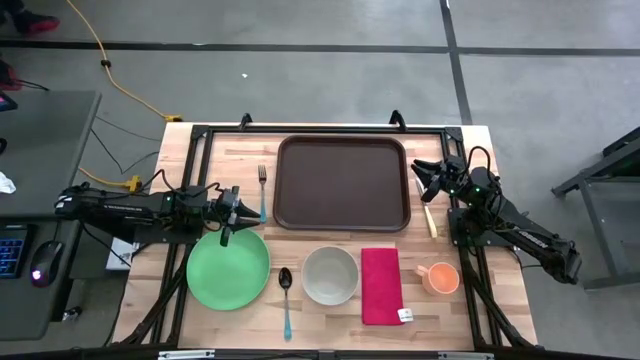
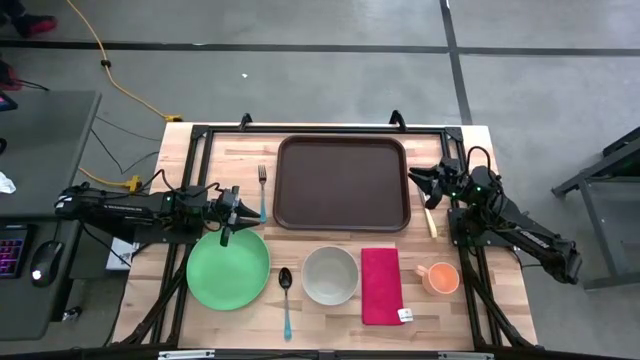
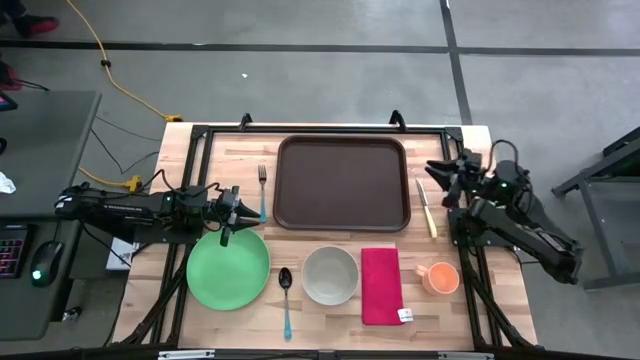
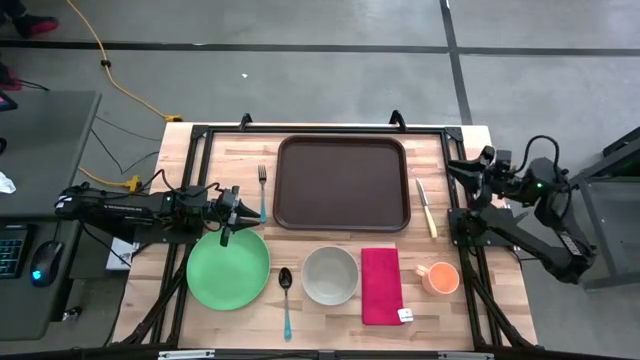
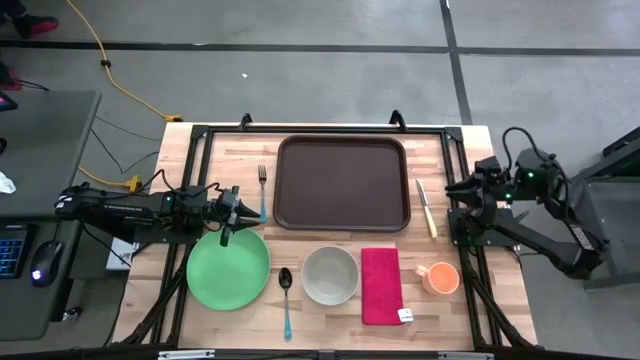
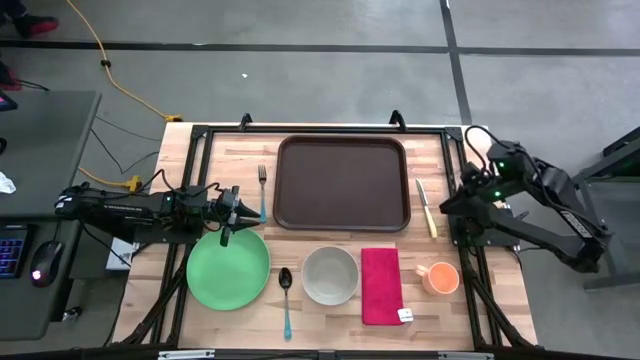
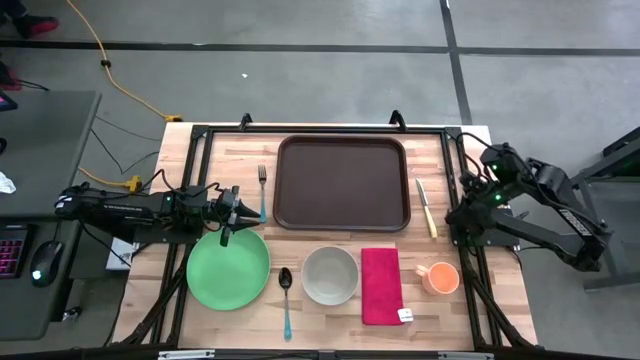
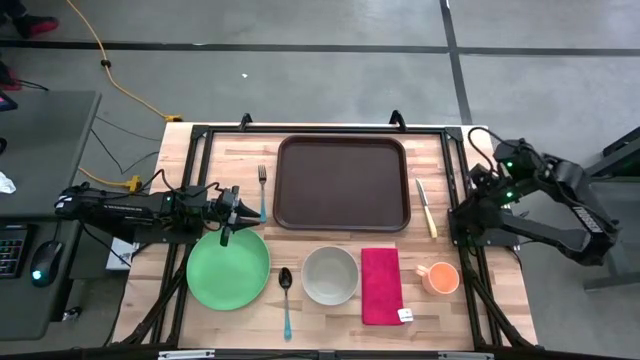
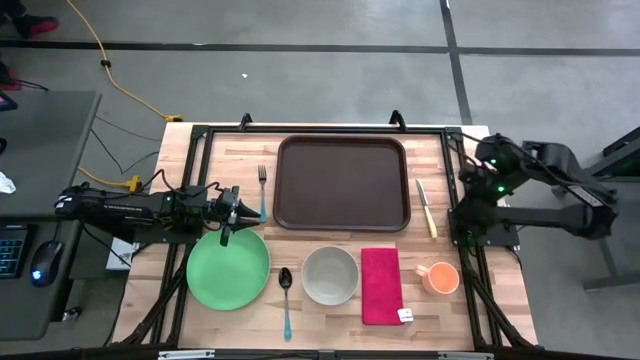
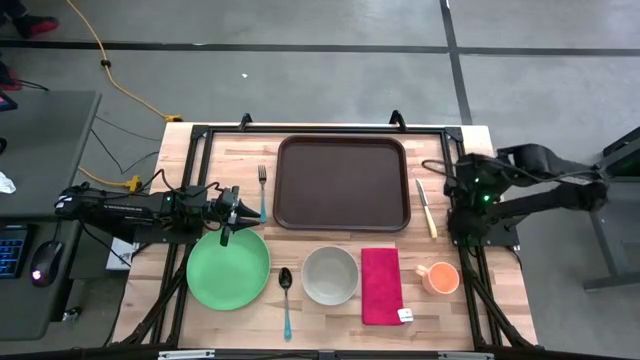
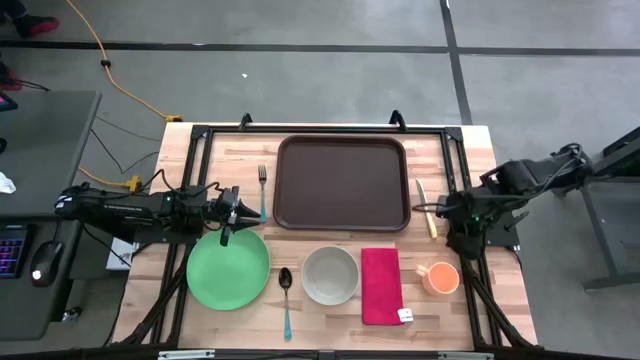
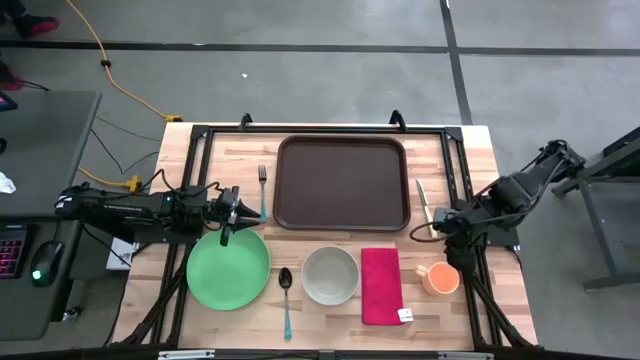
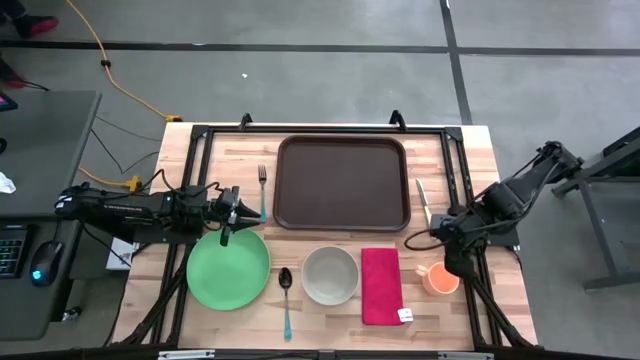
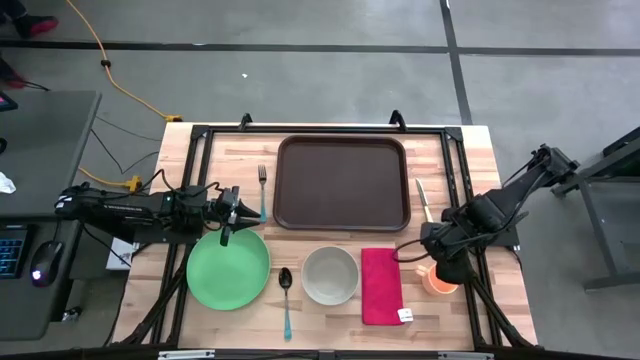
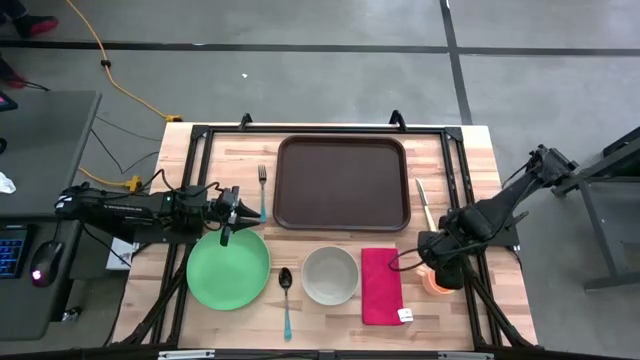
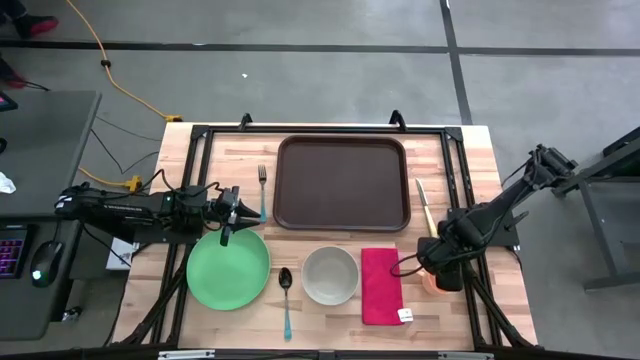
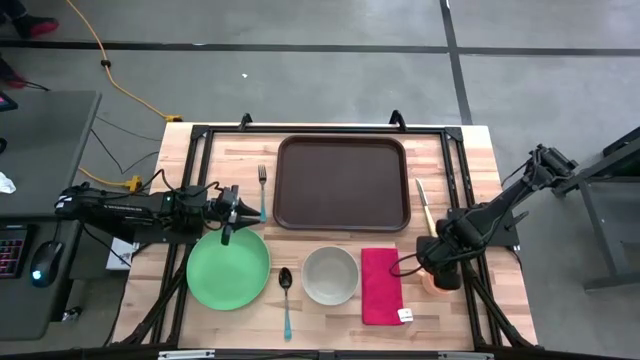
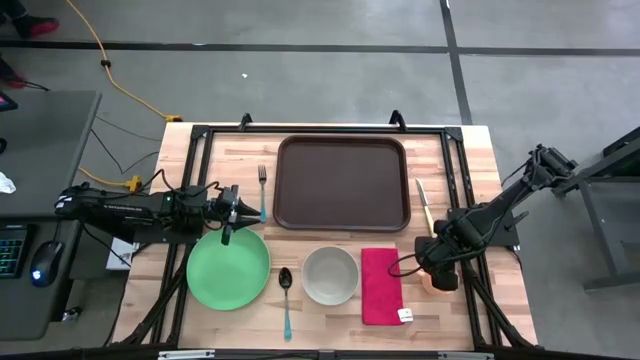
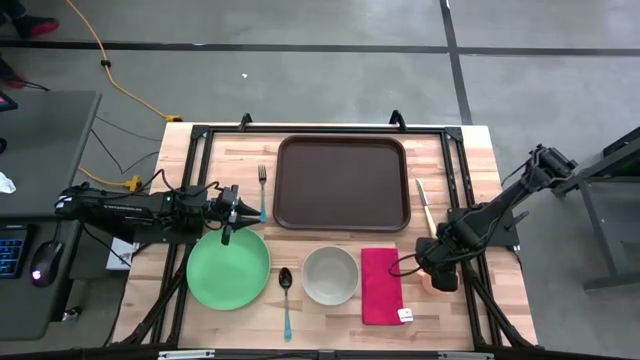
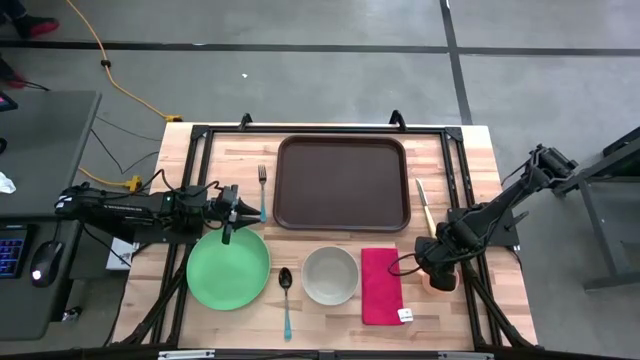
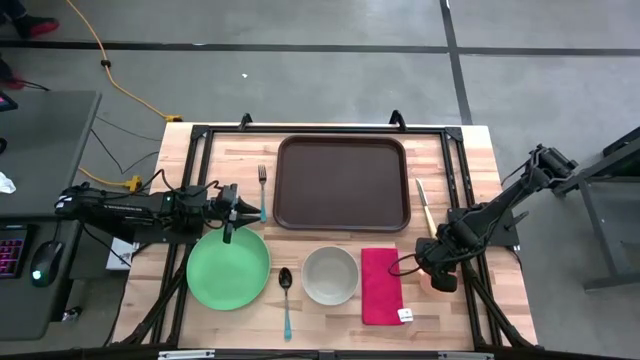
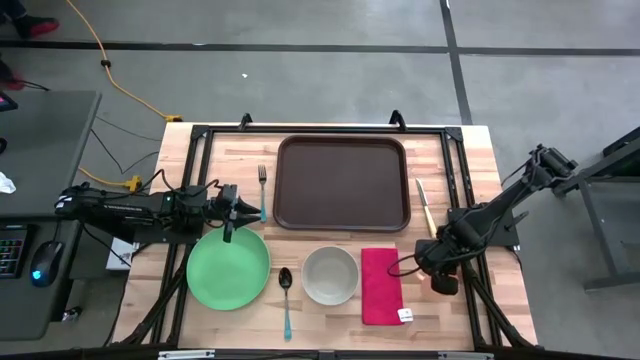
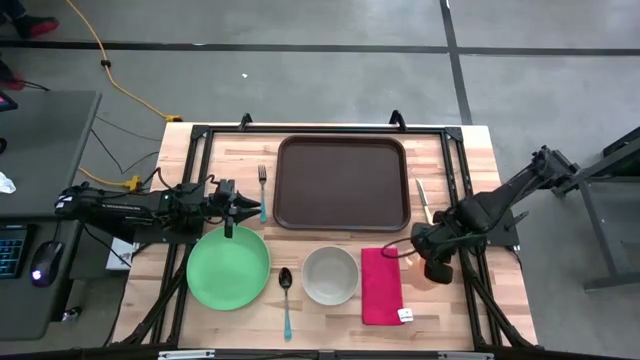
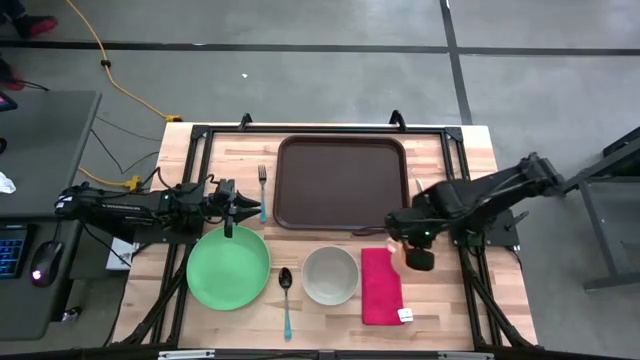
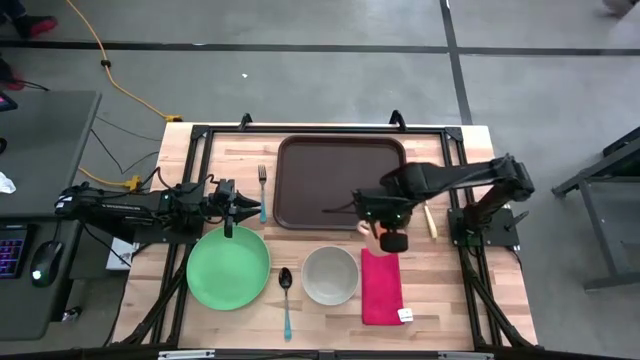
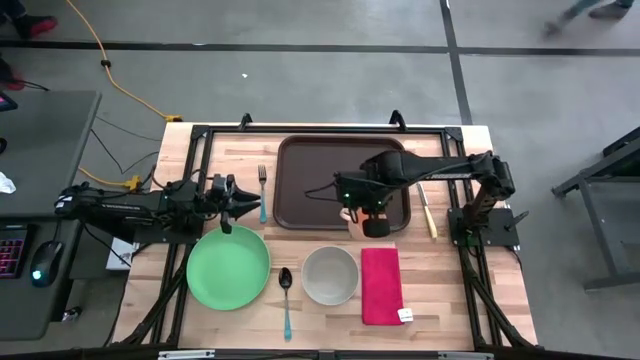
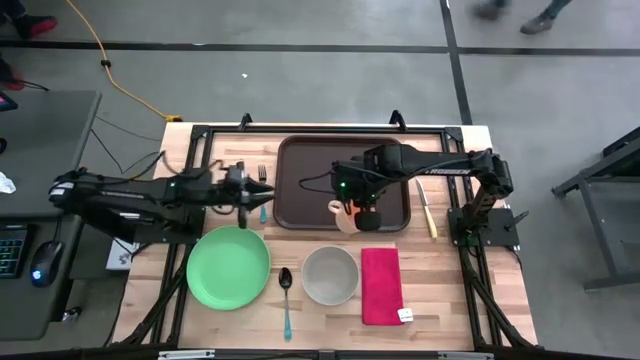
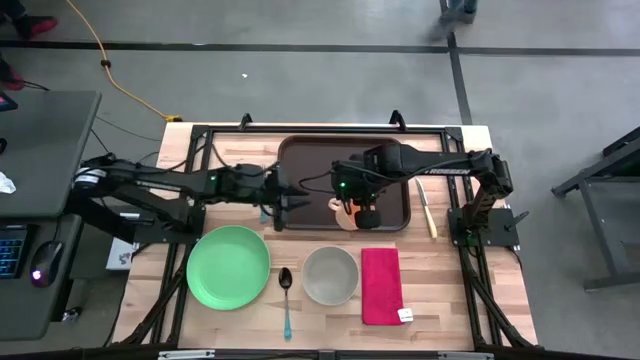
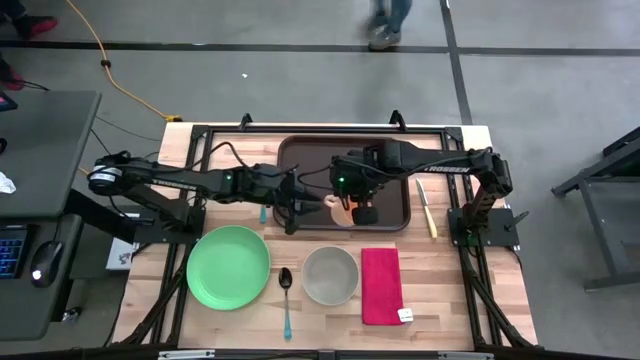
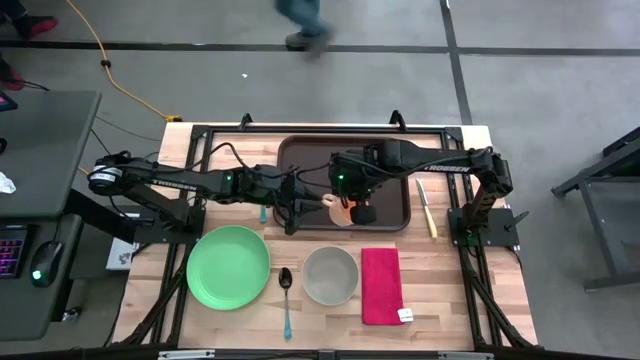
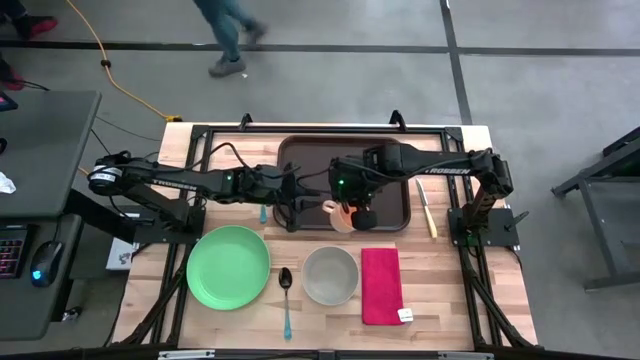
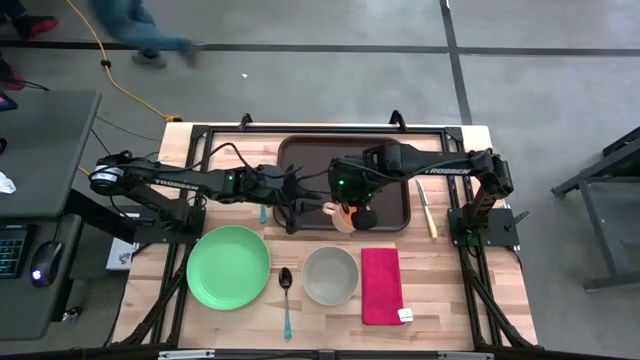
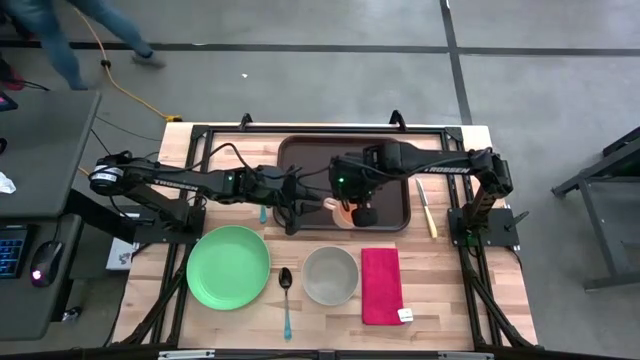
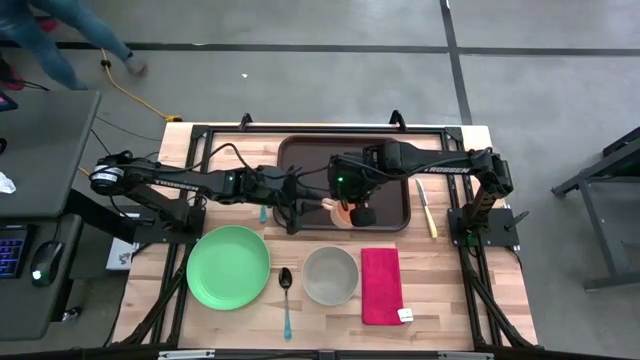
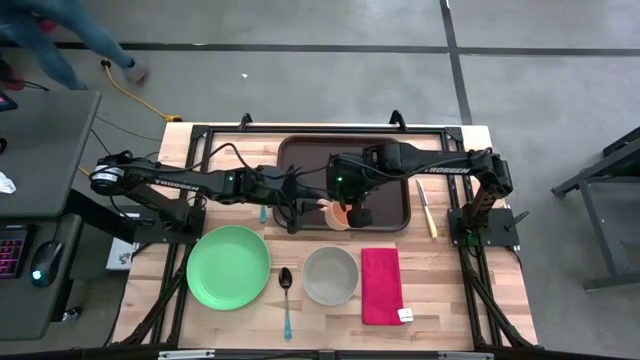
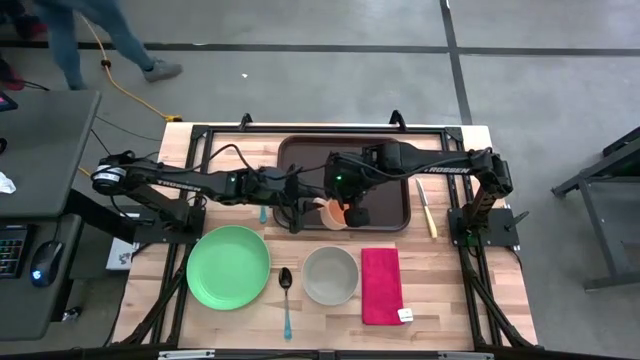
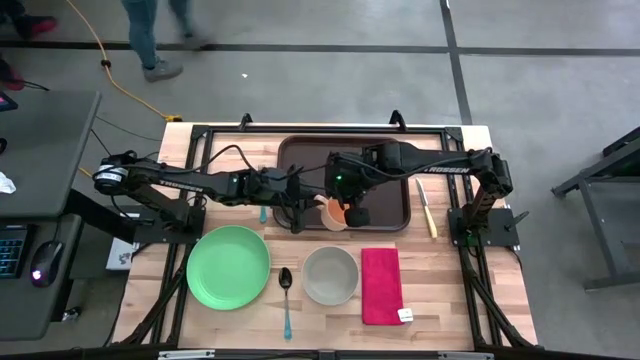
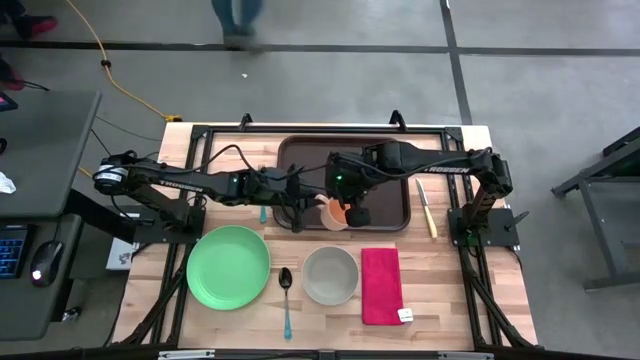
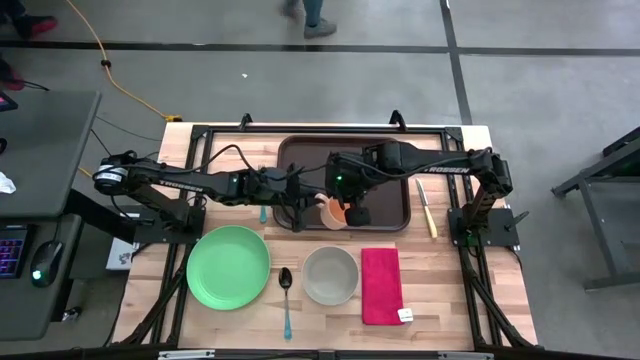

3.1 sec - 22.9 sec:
Task: Set up tray
Put the orange mug on the brown tray

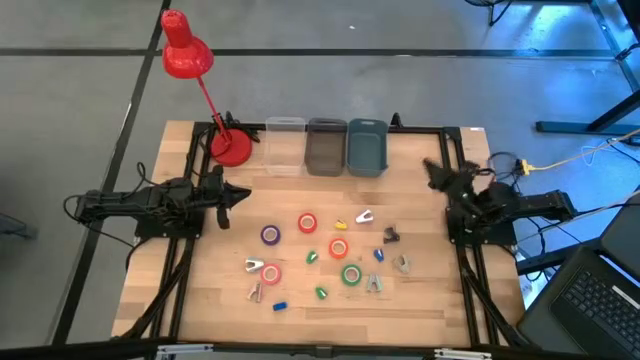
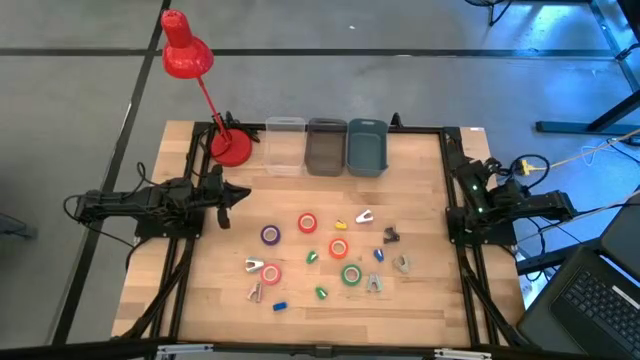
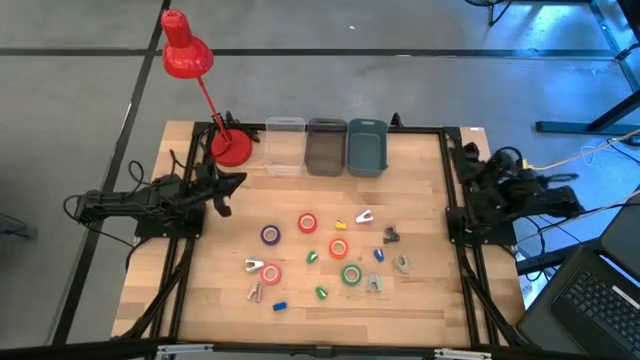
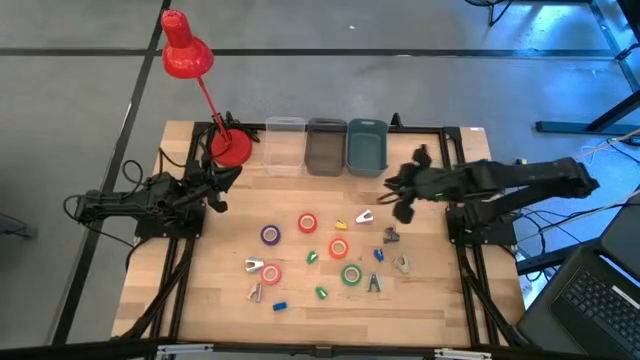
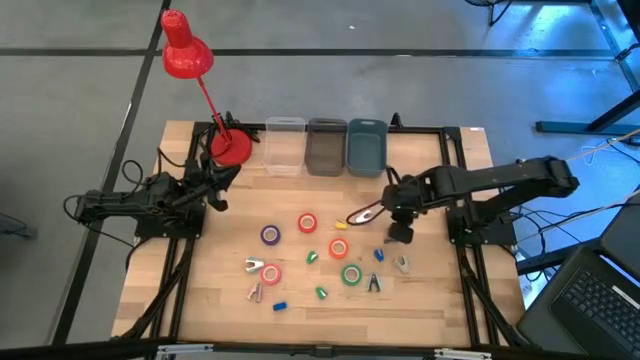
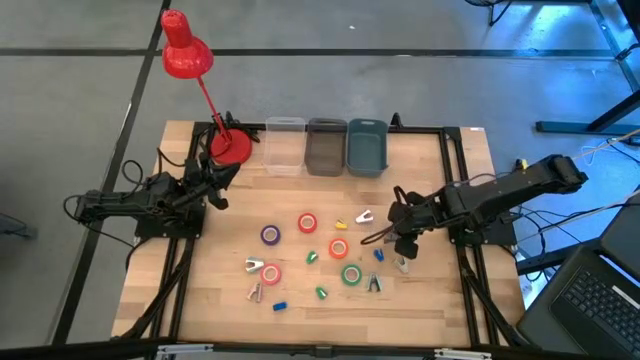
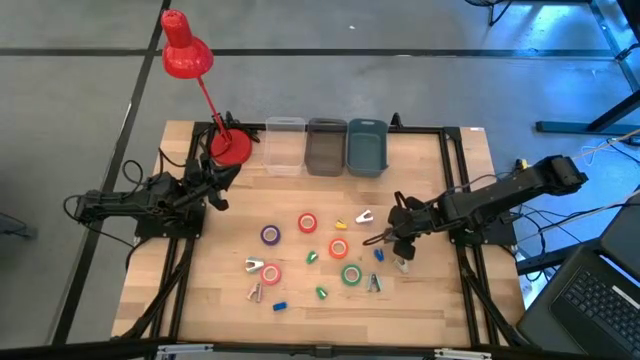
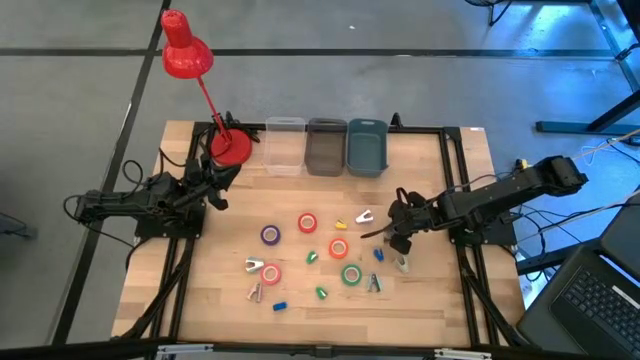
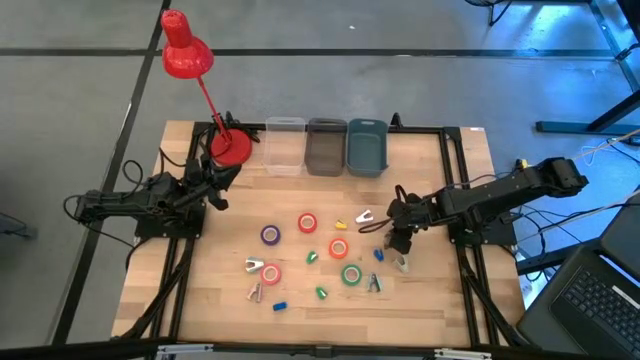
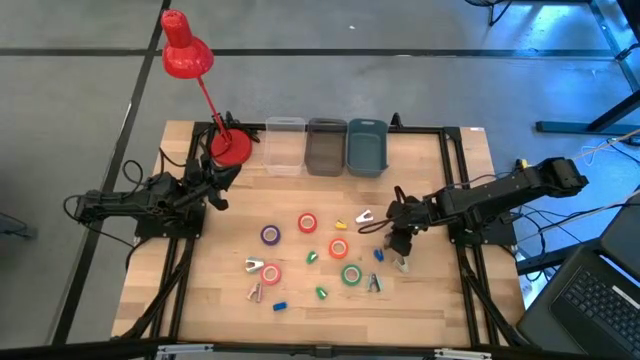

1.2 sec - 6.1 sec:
Task: Pick and place Stapler, Stapler remover, tape
Put the black staple remover into the blue bin
